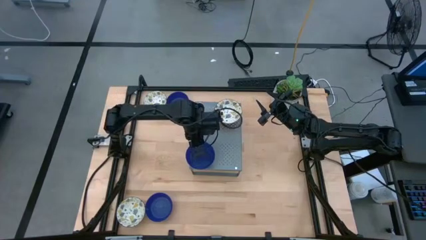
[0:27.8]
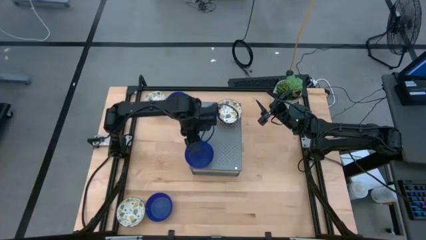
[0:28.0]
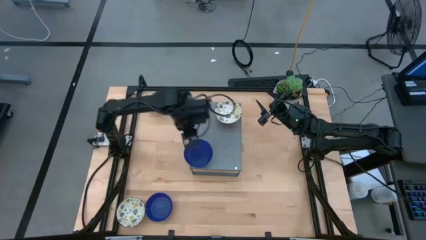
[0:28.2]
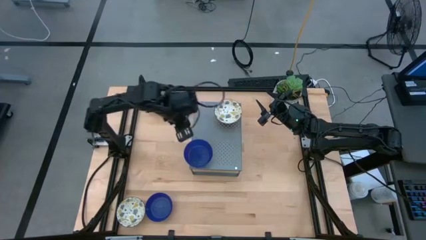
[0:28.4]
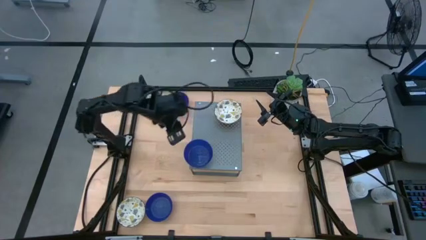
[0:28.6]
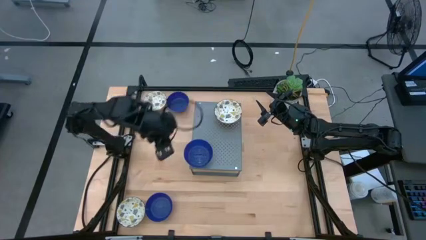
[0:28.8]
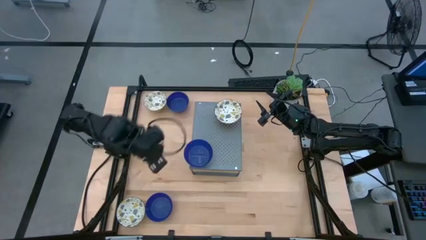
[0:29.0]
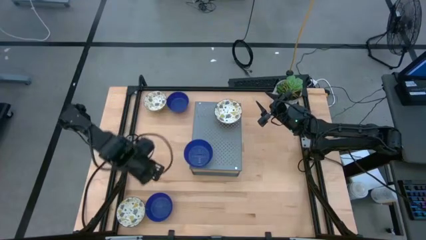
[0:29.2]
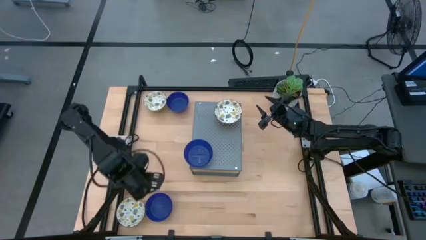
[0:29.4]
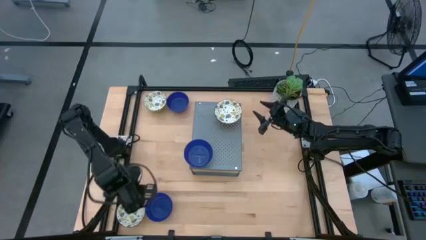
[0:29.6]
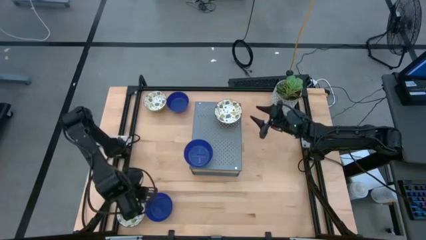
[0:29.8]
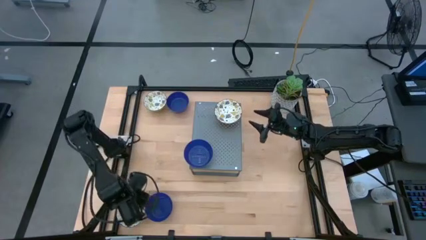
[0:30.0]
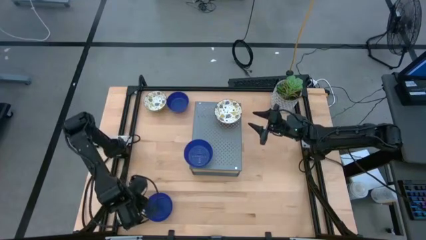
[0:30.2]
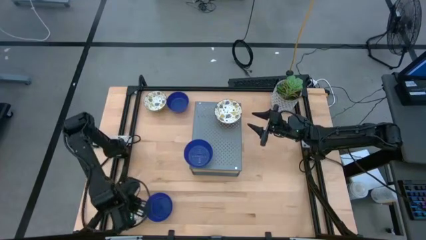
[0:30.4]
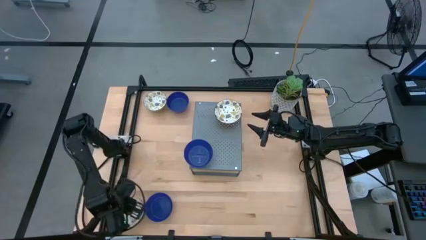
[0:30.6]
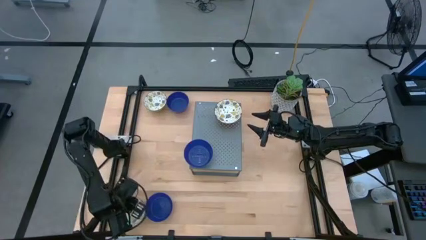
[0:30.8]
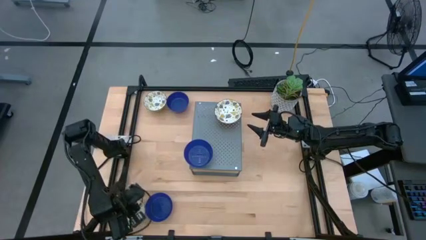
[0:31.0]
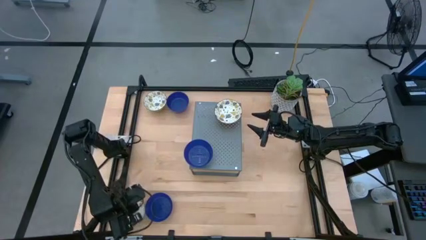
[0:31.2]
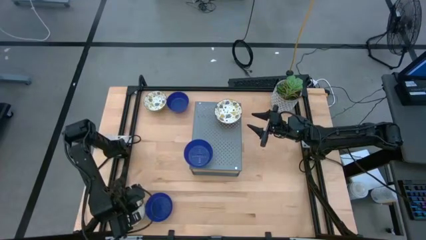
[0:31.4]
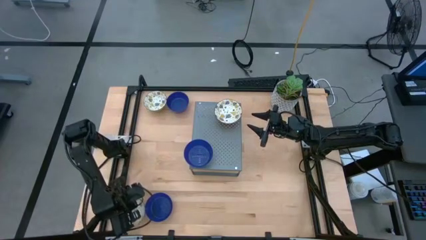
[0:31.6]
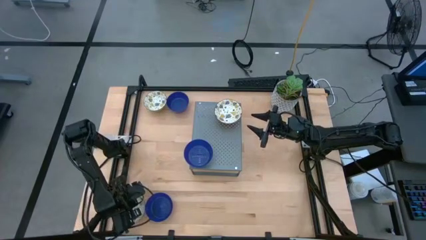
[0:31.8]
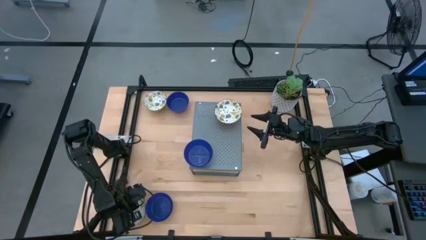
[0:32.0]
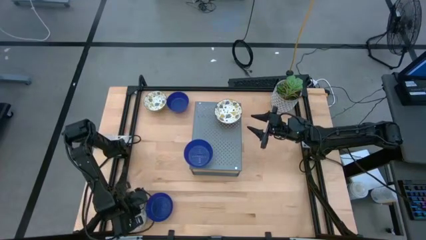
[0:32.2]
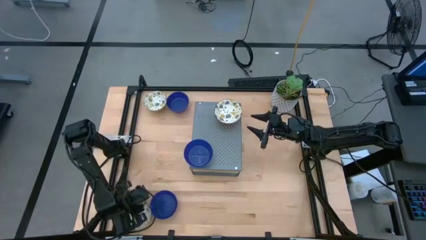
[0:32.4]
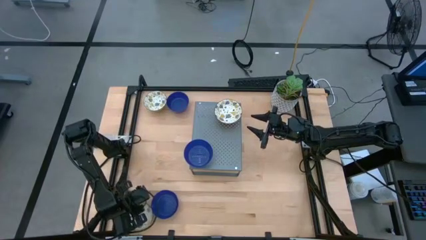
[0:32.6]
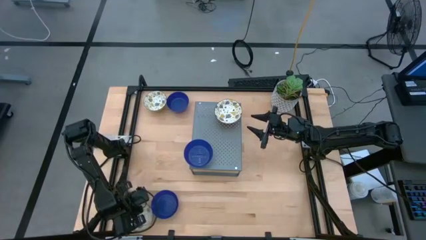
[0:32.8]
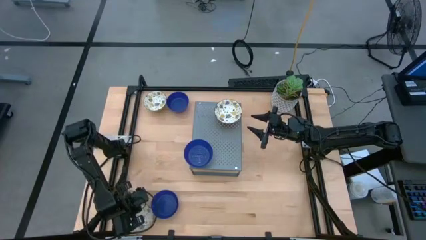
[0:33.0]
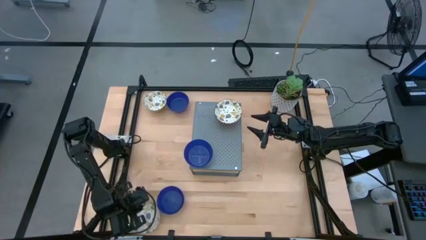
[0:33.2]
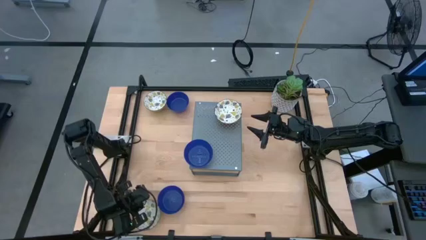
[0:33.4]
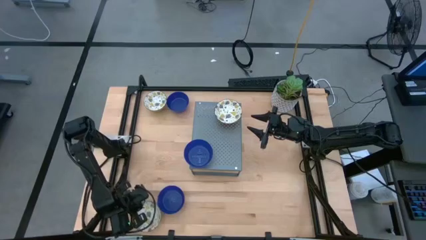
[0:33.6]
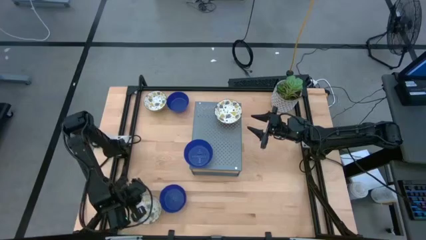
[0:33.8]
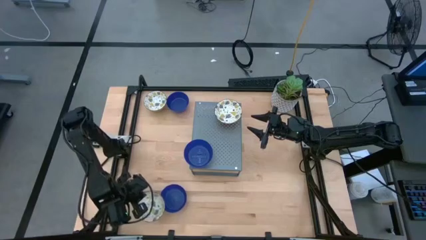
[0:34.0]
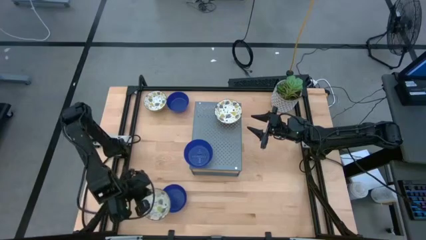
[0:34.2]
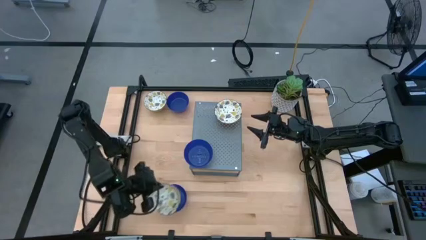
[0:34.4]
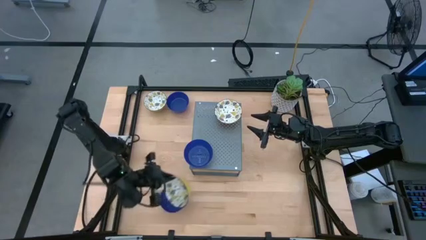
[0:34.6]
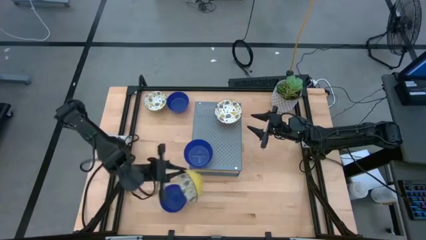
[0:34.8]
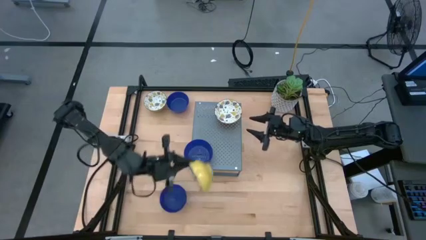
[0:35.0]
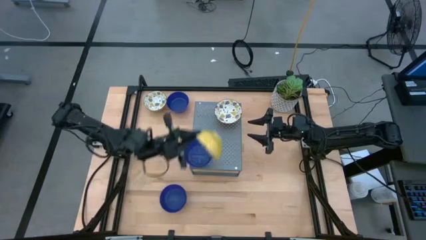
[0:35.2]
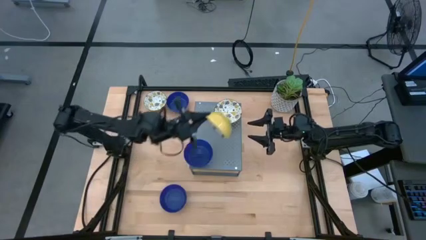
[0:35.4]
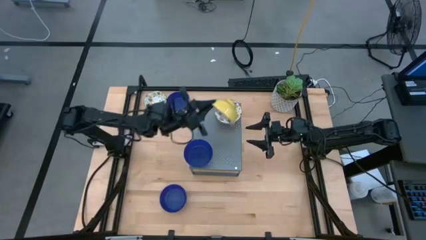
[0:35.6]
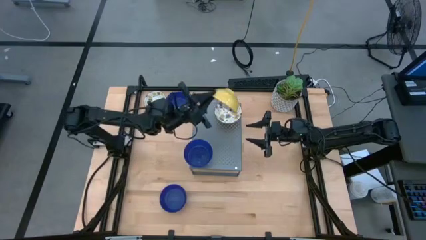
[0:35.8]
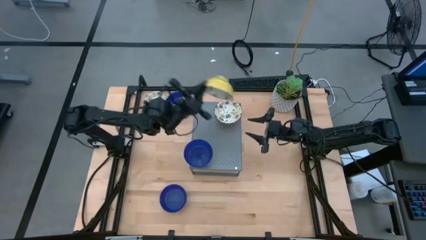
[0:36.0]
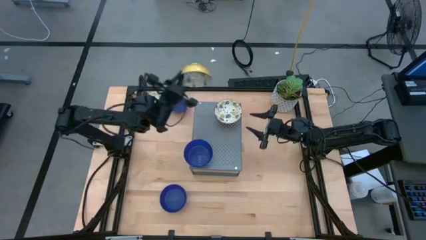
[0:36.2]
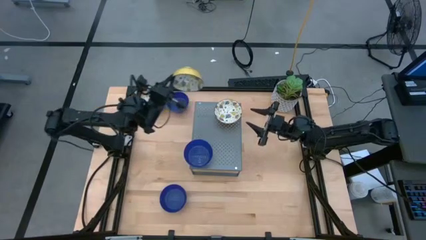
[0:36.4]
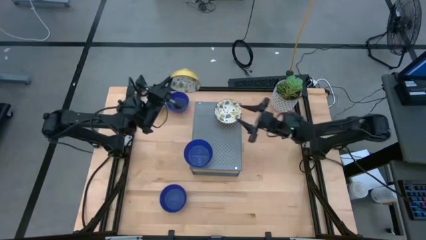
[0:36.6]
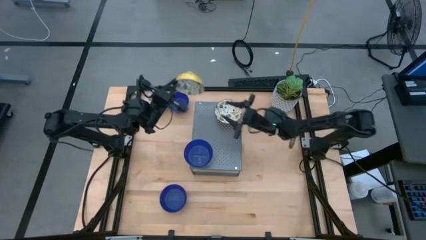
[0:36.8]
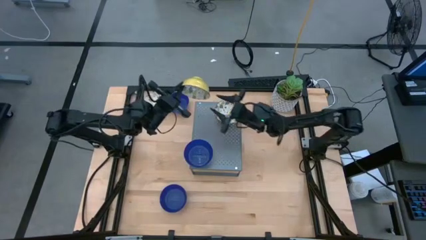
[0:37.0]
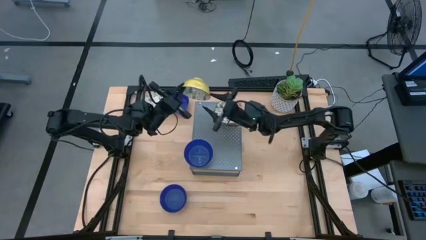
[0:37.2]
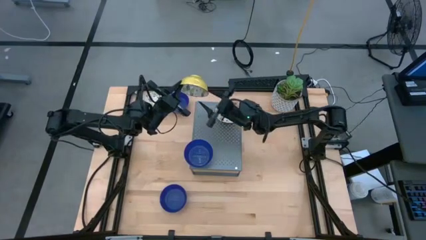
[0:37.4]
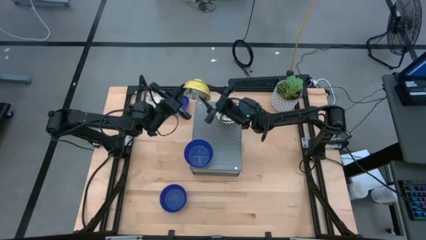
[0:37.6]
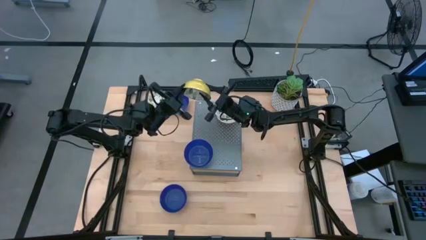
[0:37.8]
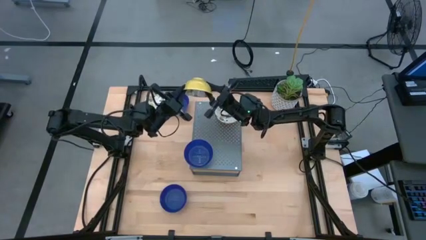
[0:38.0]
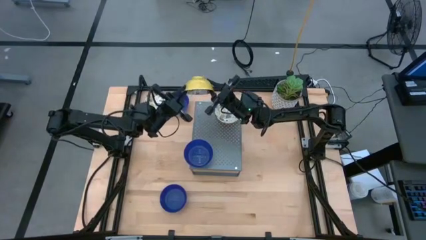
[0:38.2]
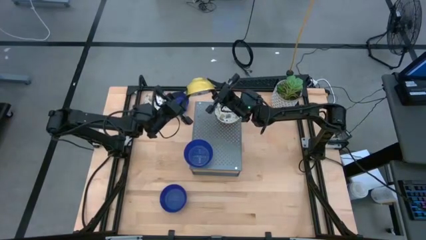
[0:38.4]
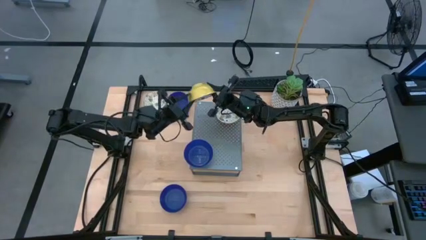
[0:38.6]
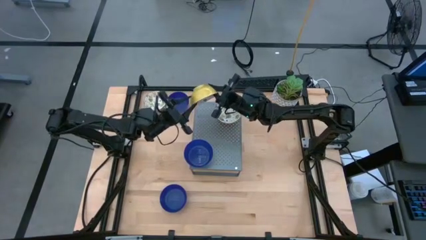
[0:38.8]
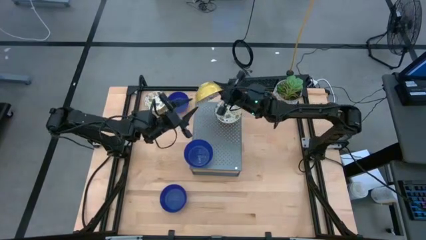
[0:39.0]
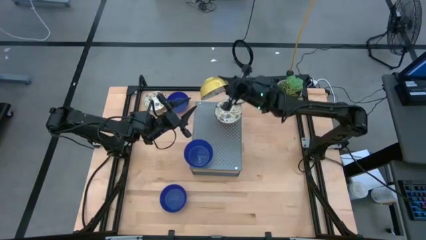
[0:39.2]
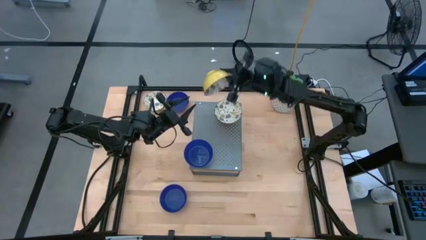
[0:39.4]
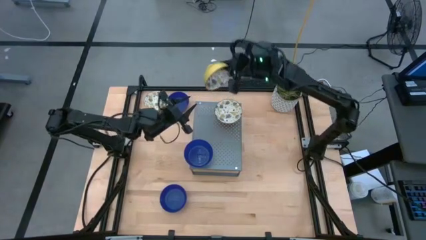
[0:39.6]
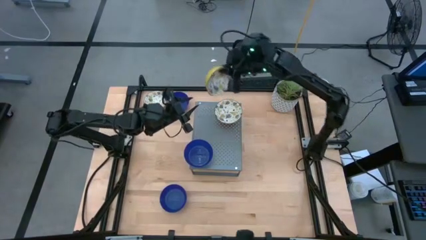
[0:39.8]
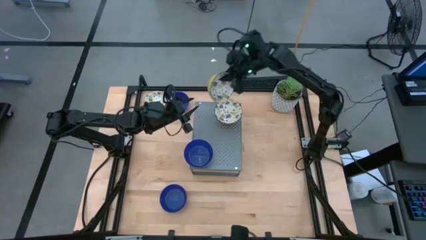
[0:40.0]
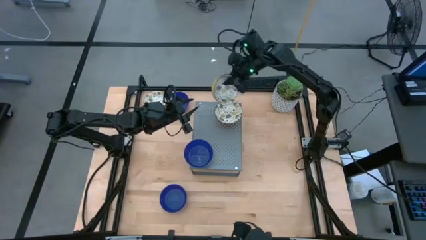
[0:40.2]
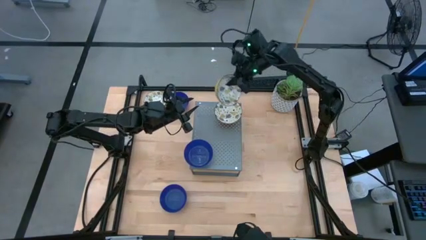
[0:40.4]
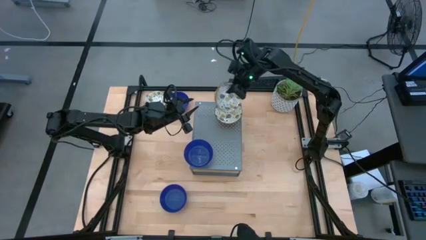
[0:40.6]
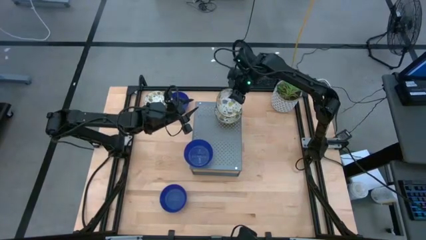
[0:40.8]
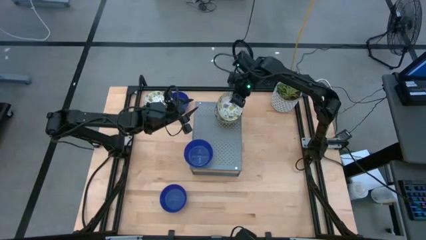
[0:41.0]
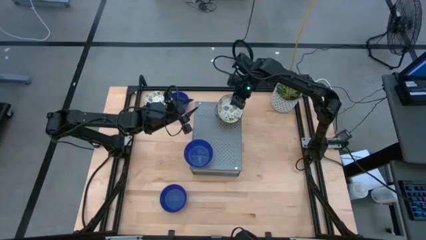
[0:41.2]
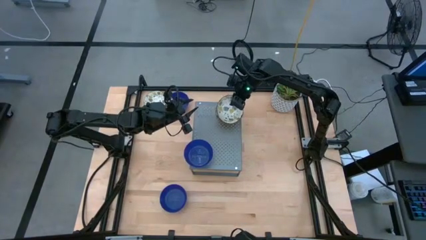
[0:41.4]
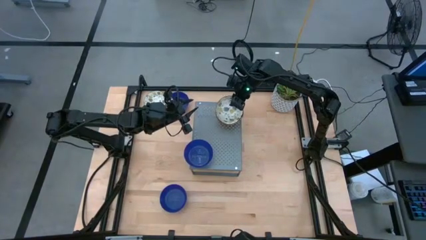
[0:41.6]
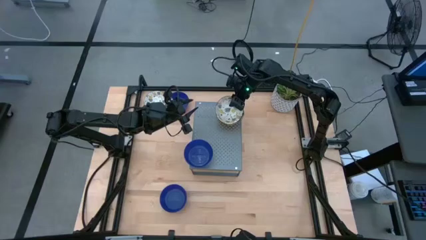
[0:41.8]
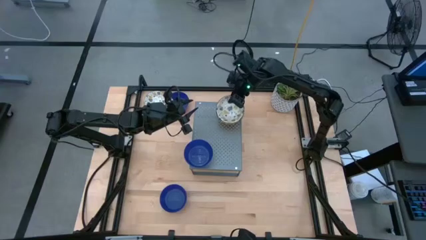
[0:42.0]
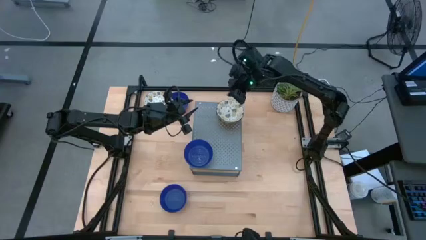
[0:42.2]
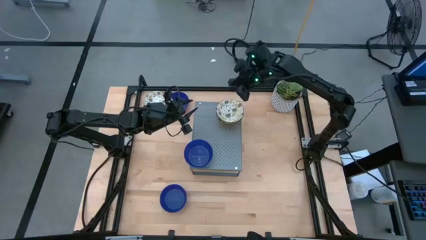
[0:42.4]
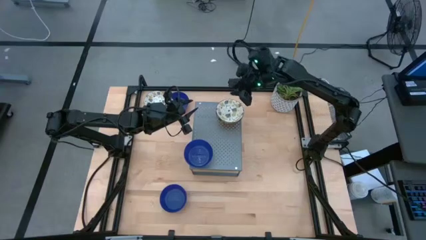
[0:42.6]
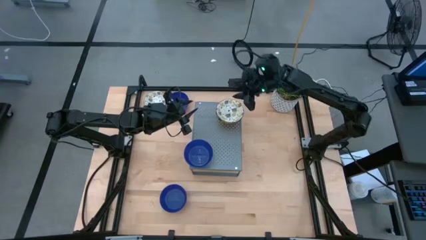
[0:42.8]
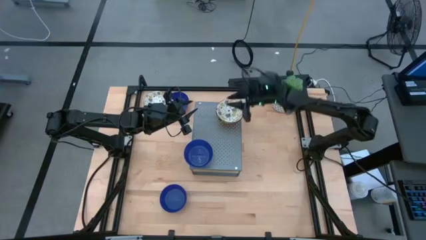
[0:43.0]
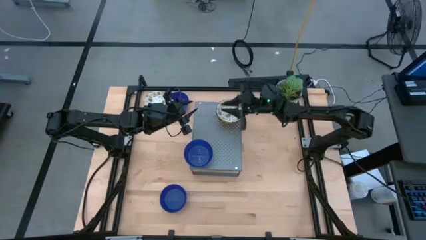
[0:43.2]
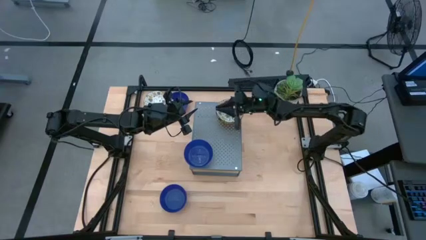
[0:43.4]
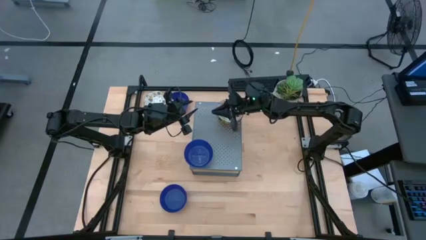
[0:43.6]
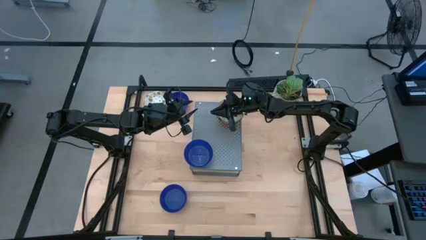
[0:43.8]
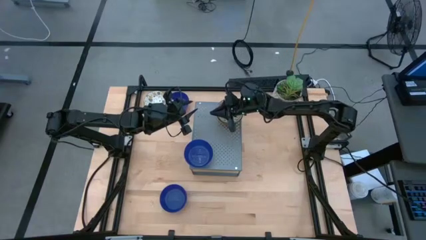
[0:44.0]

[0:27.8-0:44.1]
Task: Pick & Place Mini bowls
Stack the bottom yellow patterned bowl on top of the yellow patterned bowl on the shelf
